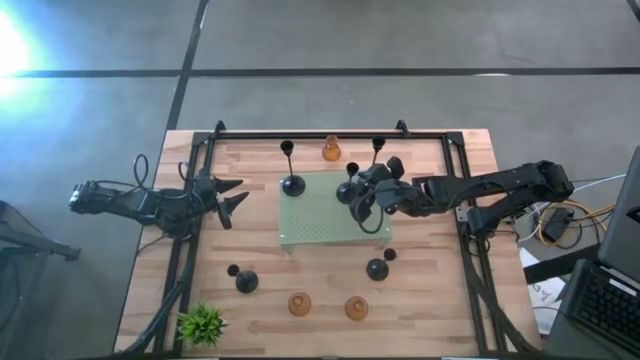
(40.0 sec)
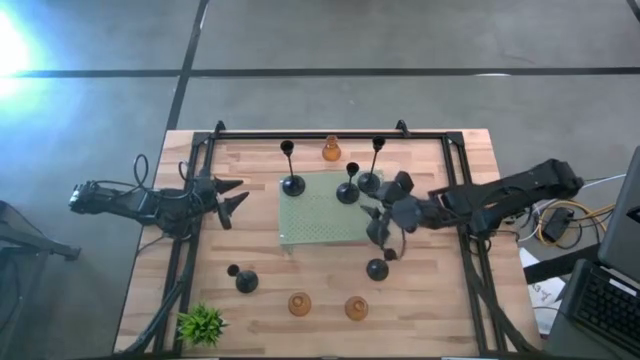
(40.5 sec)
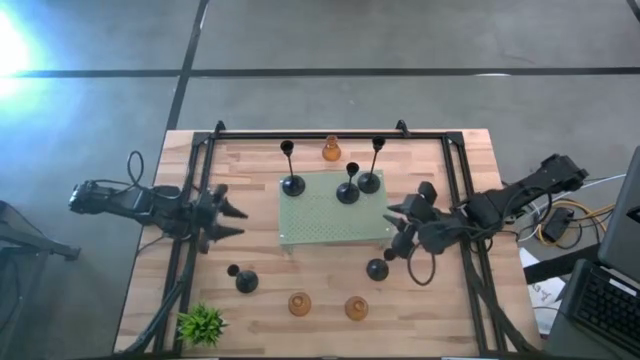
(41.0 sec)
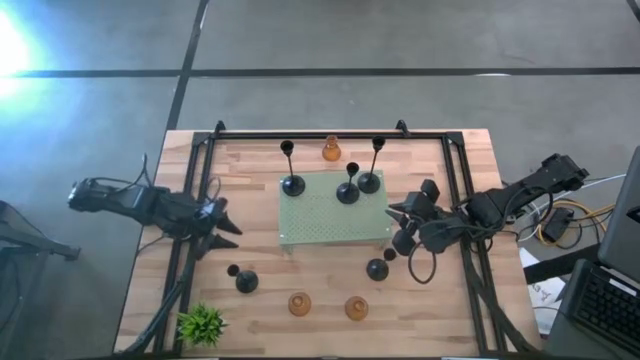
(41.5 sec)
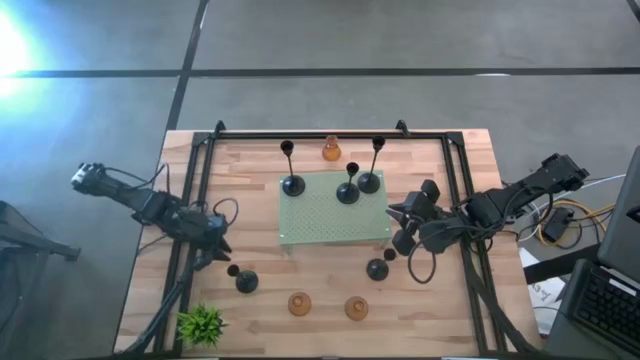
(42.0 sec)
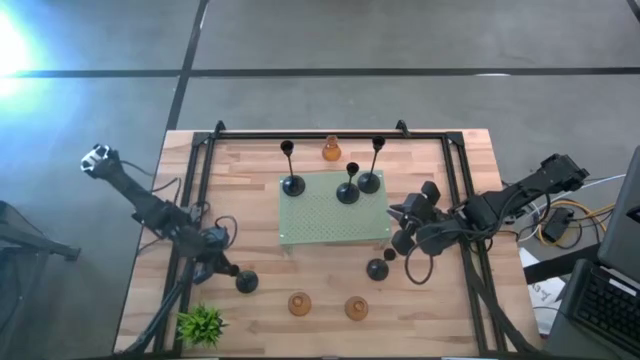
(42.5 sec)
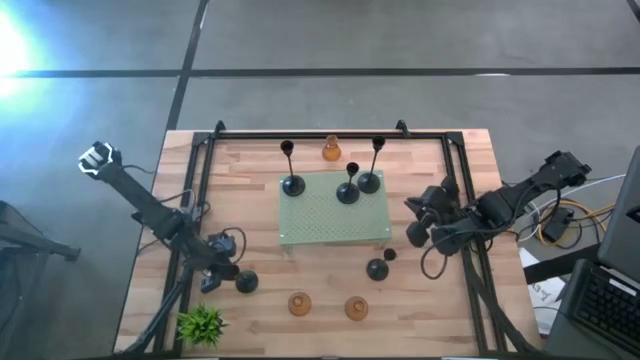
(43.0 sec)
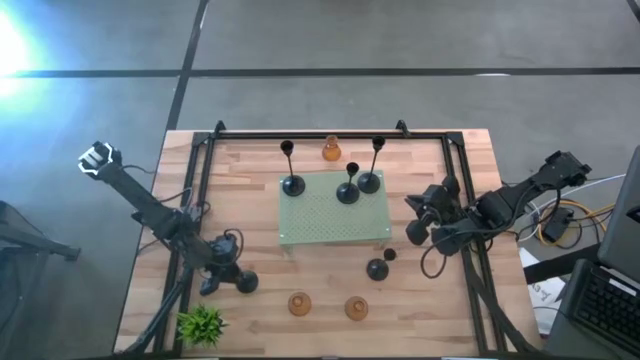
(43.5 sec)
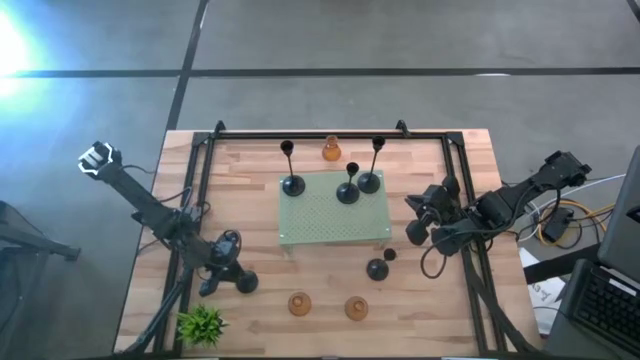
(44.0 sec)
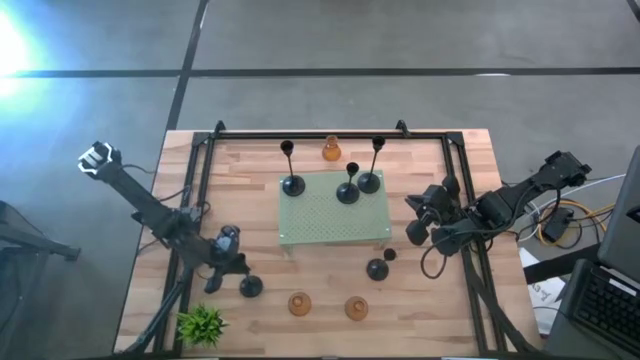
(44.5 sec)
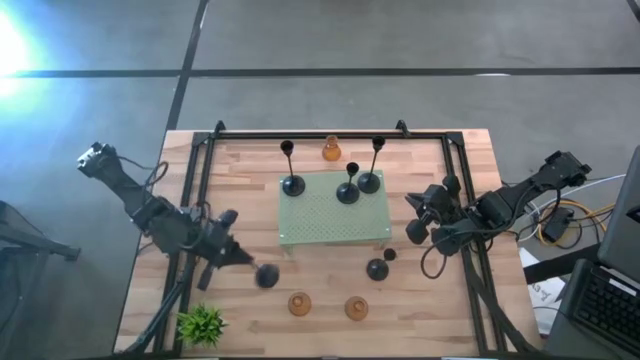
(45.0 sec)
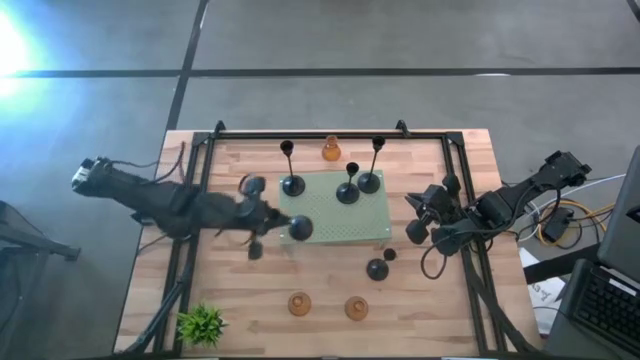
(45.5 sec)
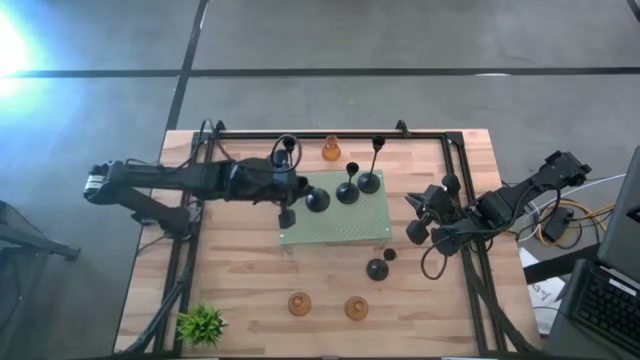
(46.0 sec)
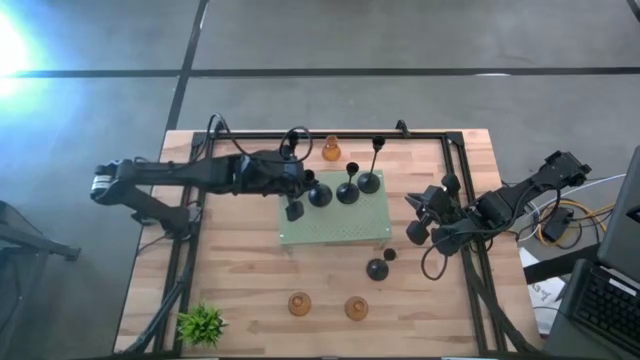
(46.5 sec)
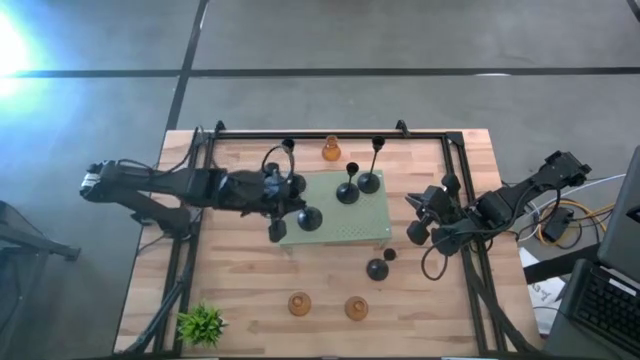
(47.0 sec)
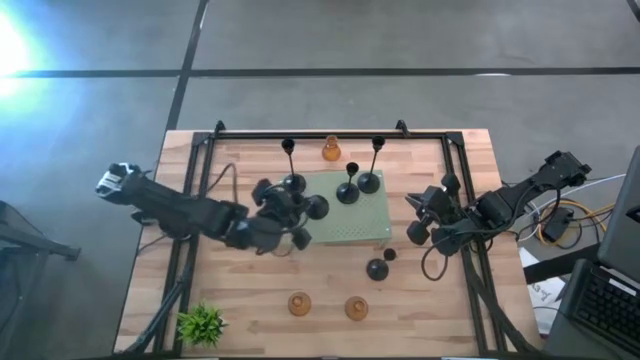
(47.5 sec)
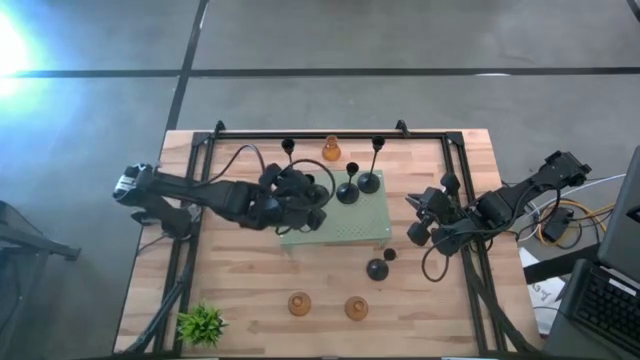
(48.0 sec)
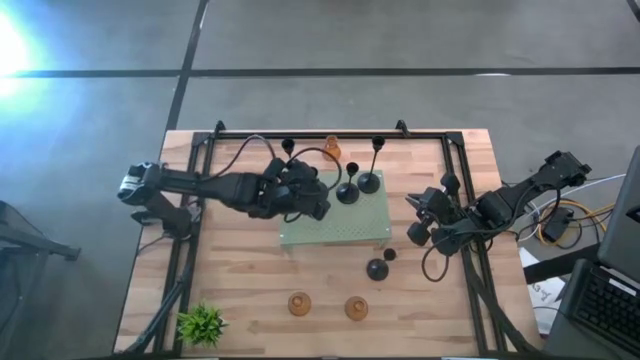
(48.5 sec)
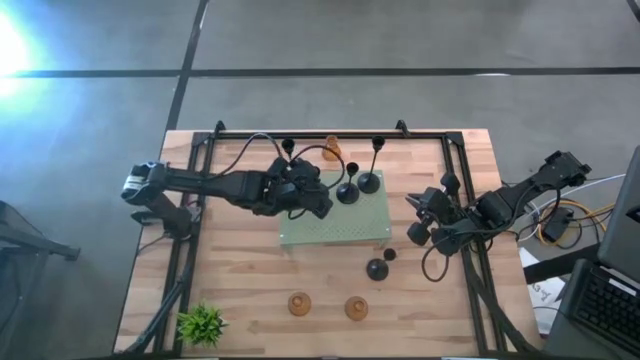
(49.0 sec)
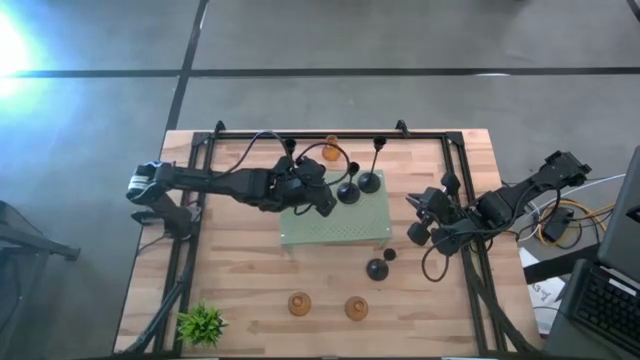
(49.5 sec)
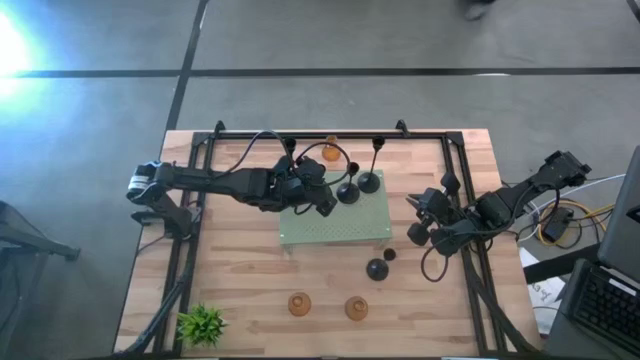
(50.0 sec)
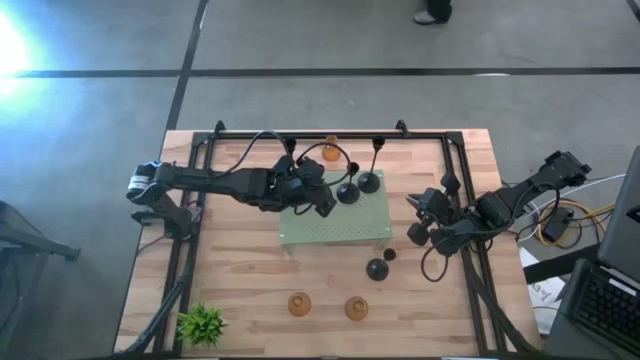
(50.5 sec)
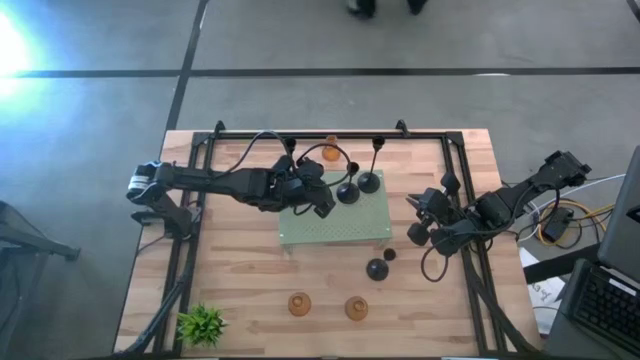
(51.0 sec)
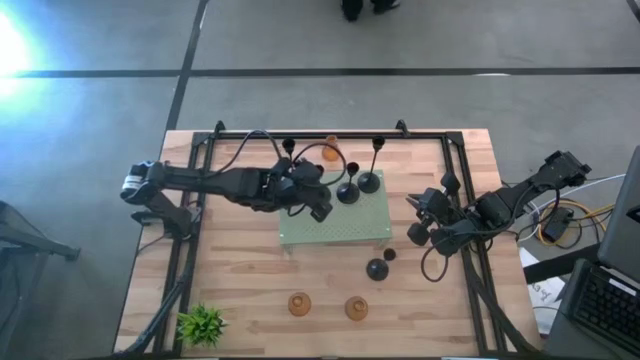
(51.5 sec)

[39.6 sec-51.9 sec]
Task: Pick & Place candle stick holders
Put the small black candle holder on the shelf

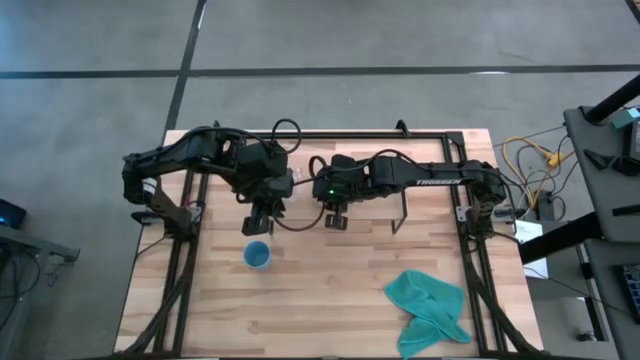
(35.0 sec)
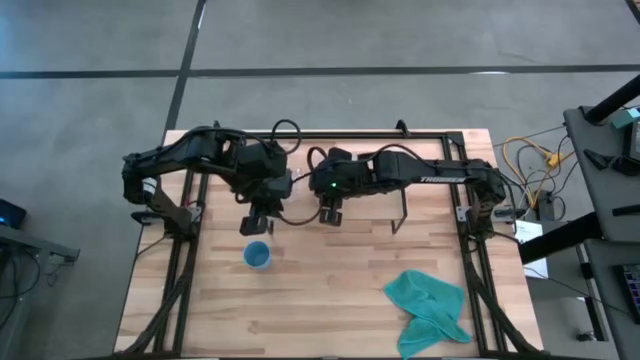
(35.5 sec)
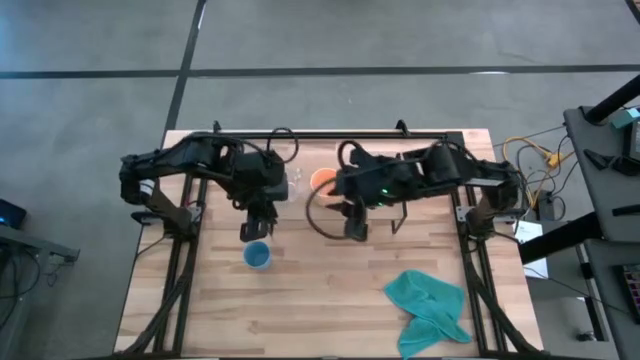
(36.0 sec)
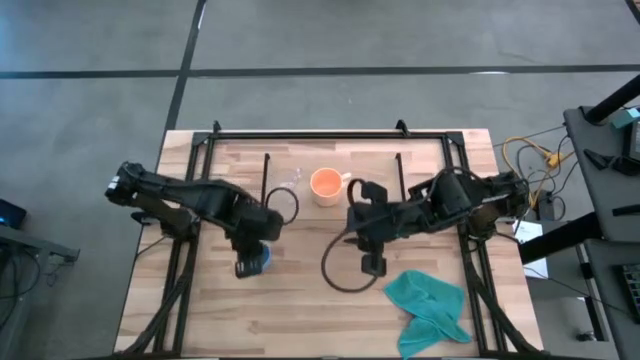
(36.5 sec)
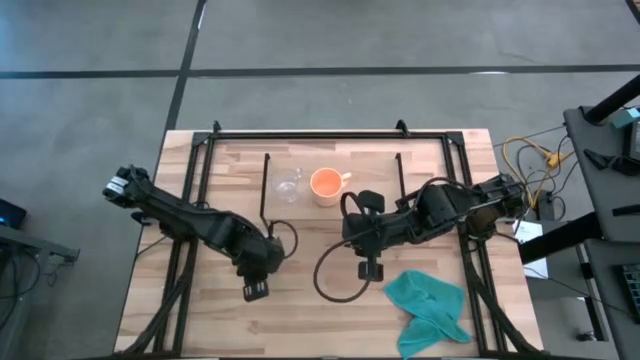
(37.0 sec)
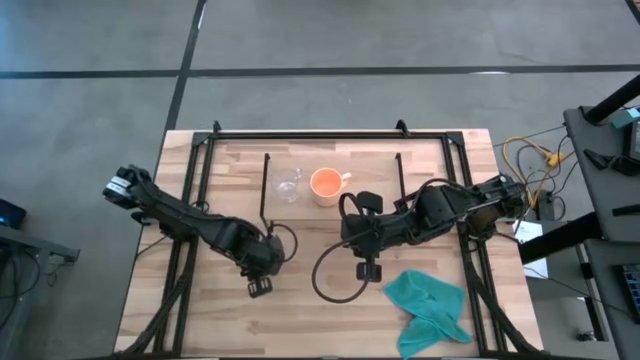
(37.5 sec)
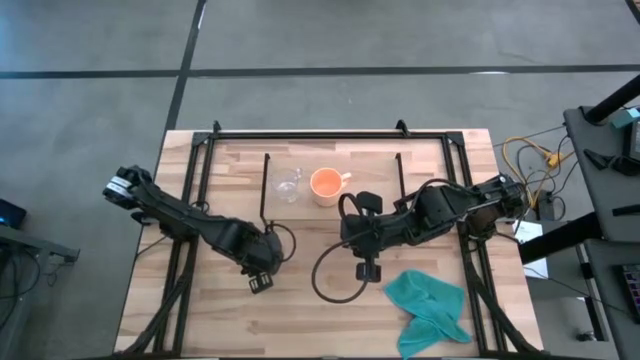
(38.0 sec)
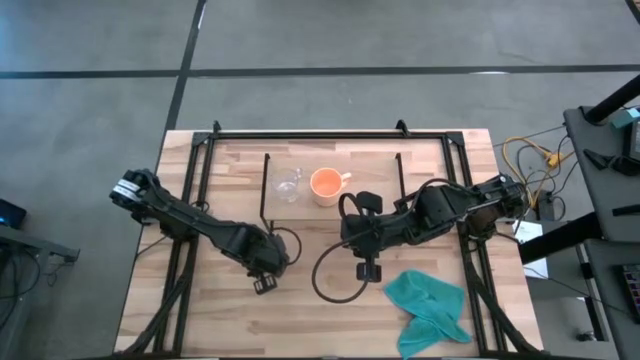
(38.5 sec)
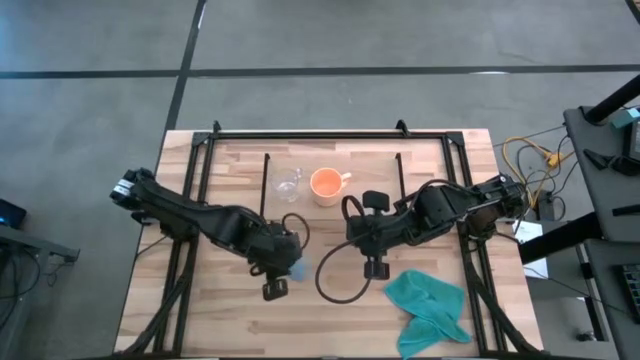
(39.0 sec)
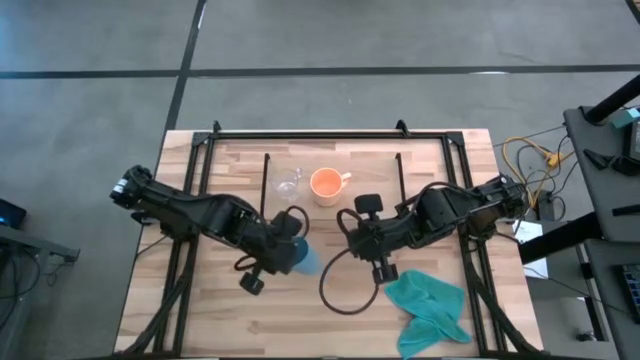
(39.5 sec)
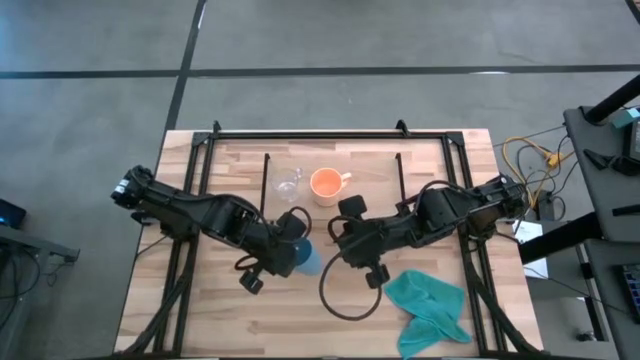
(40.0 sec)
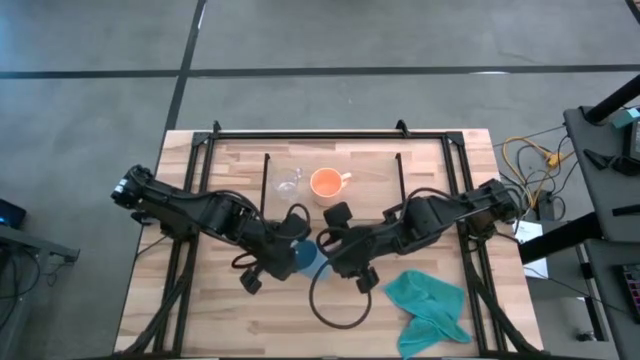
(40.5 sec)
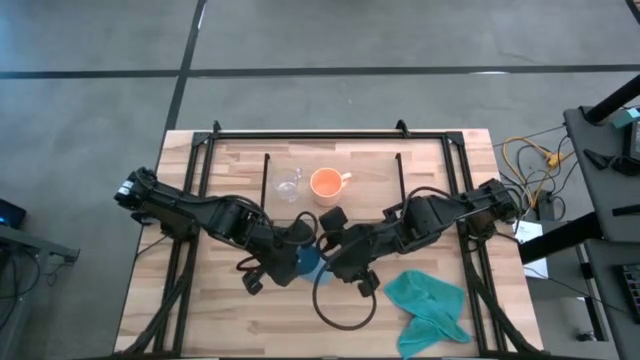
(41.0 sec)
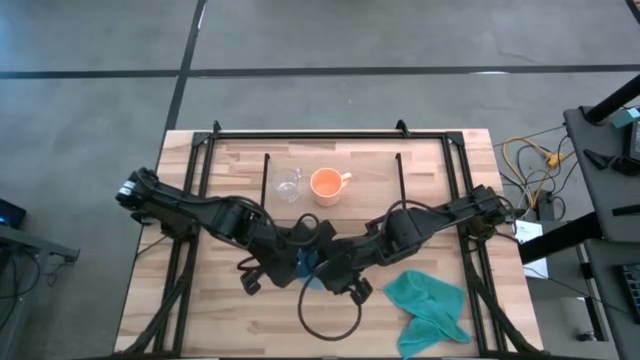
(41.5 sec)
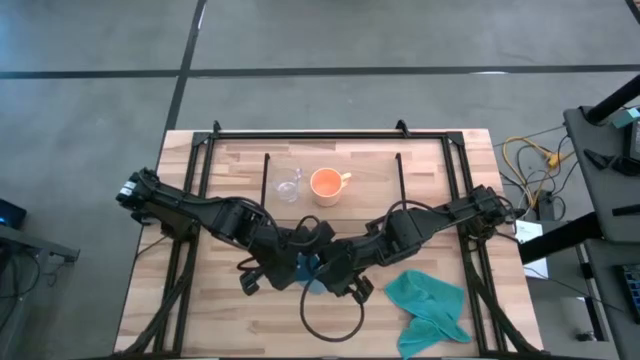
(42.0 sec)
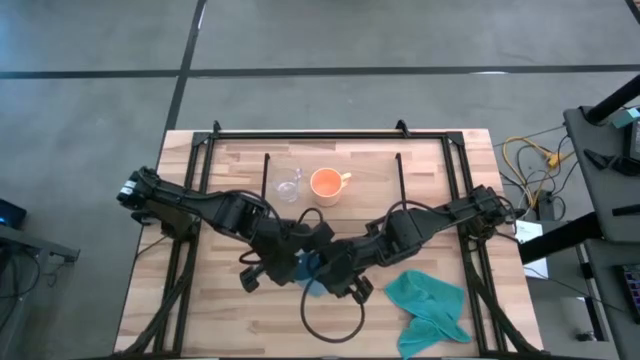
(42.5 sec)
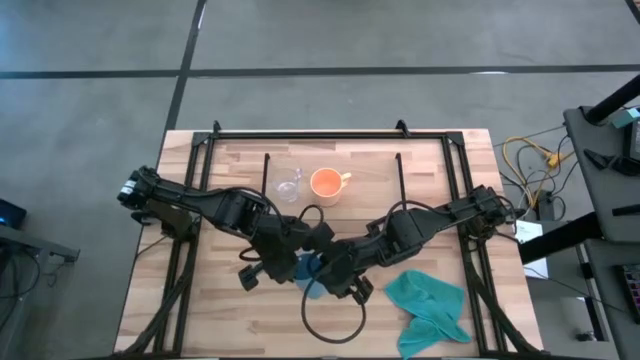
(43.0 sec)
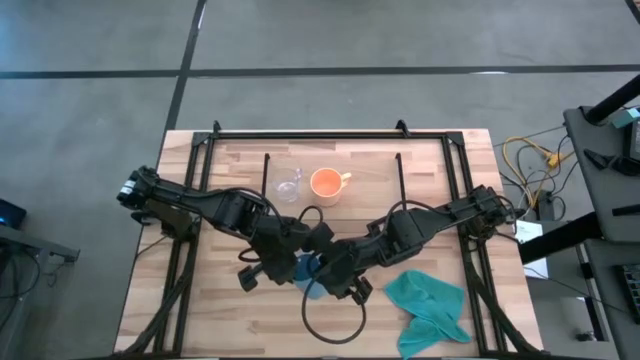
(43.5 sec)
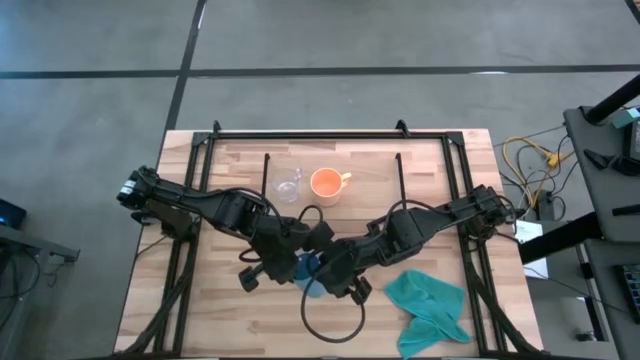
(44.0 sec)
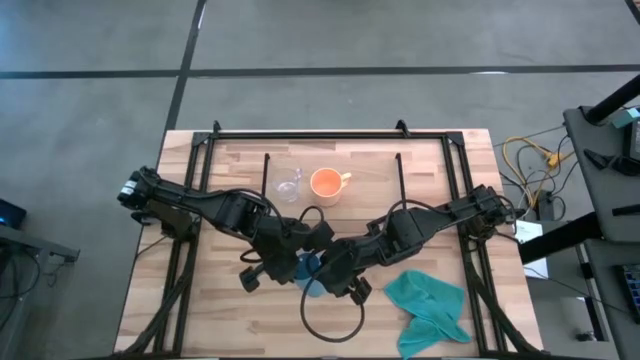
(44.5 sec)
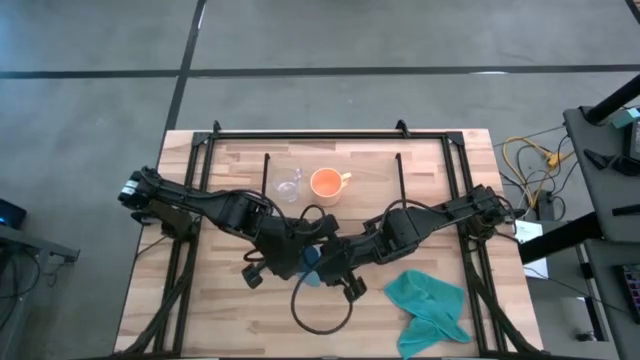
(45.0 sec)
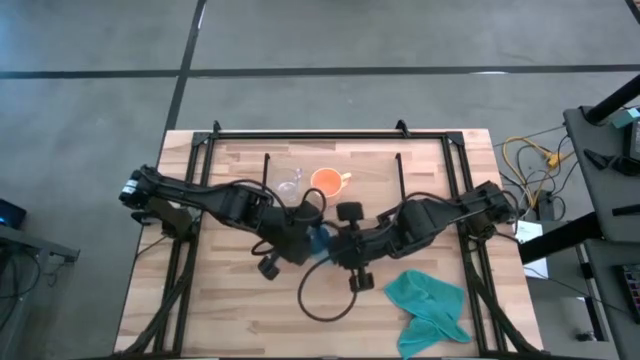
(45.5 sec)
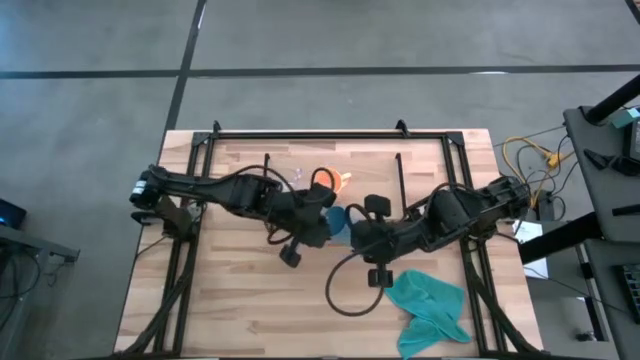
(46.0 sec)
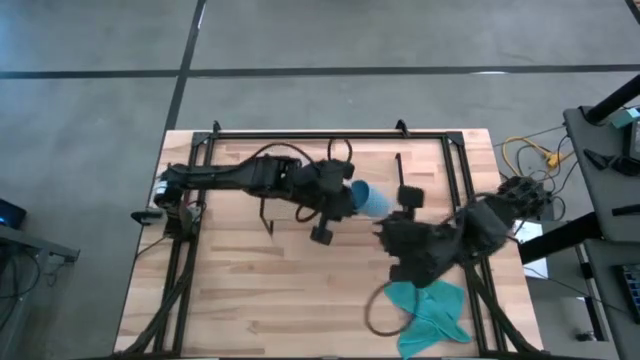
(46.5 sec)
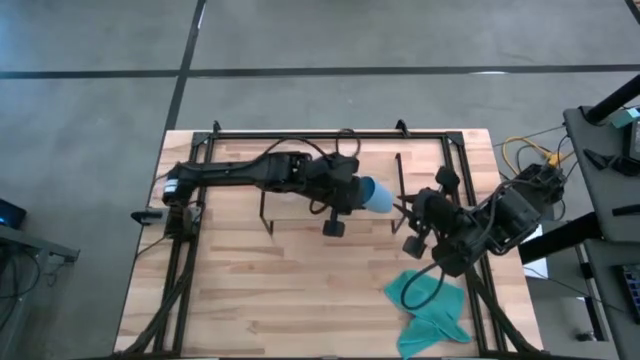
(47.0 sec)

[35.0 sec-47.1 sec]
Task: Stack small to large cups/mugs on shelf
Put the blue cup on the shelf
